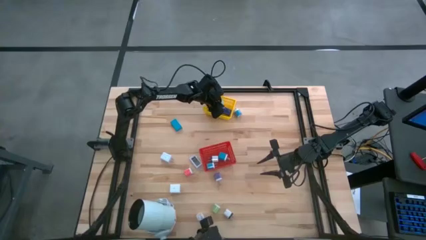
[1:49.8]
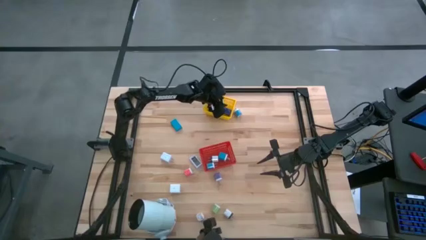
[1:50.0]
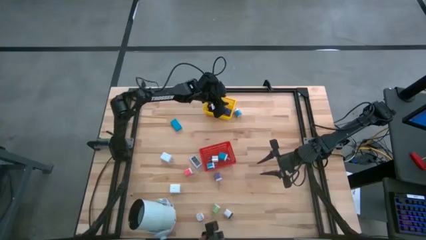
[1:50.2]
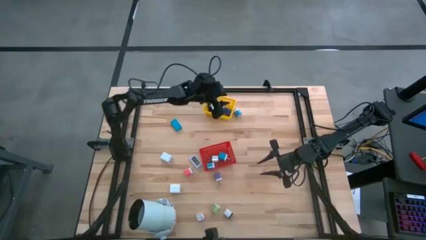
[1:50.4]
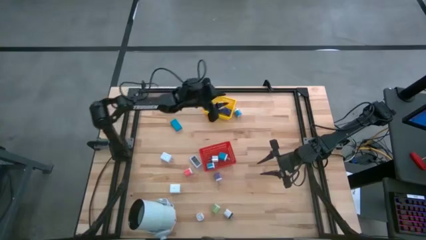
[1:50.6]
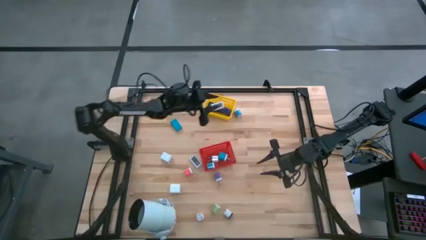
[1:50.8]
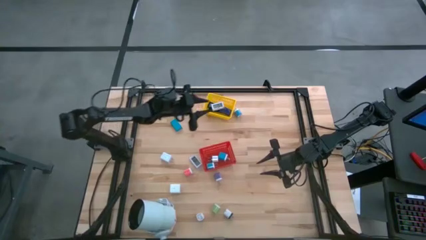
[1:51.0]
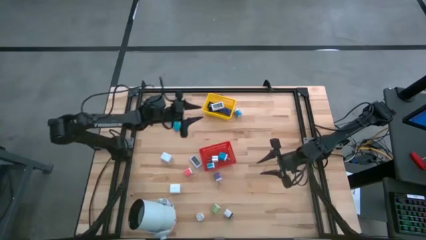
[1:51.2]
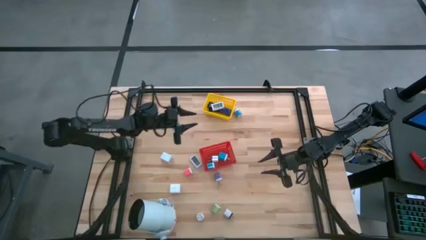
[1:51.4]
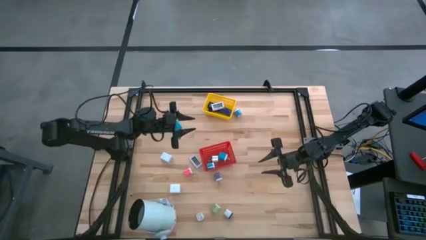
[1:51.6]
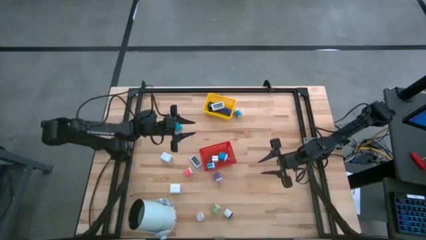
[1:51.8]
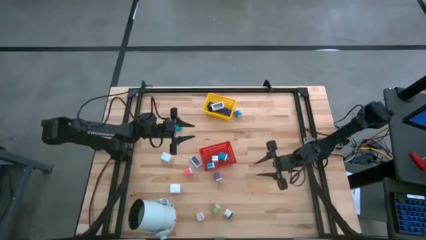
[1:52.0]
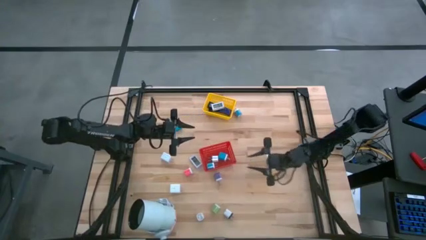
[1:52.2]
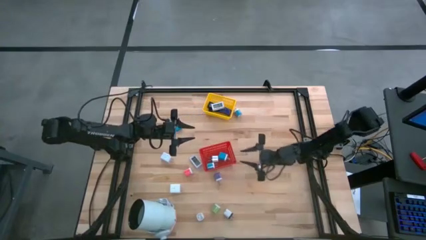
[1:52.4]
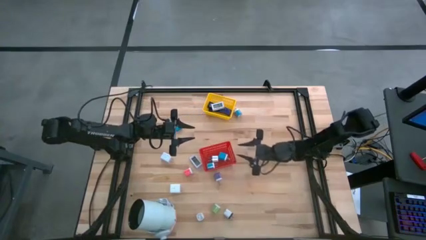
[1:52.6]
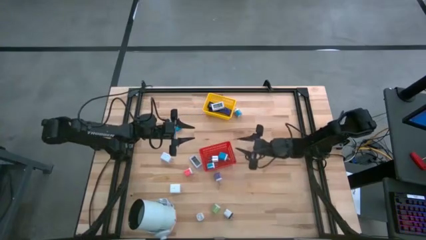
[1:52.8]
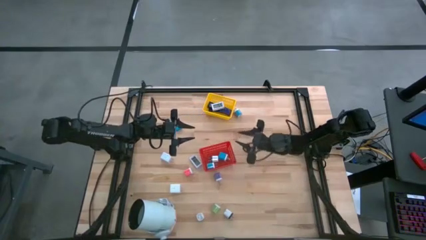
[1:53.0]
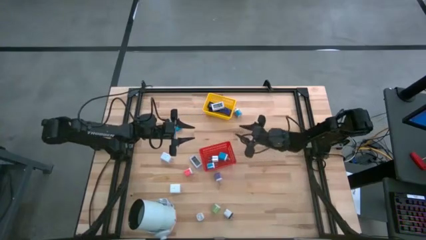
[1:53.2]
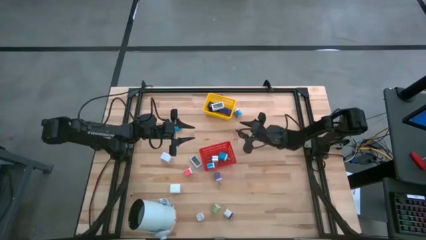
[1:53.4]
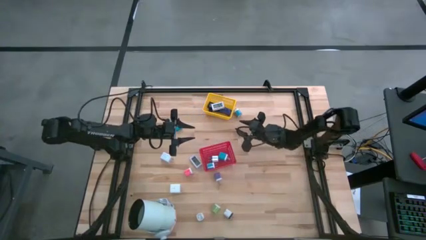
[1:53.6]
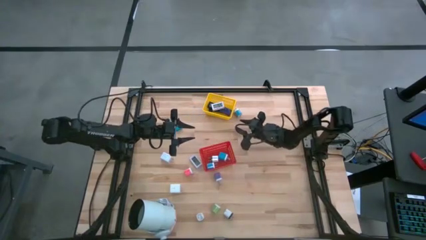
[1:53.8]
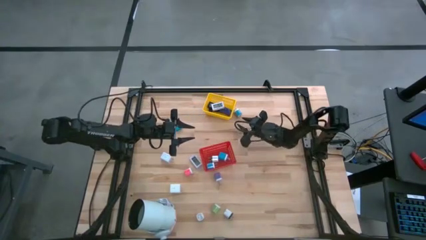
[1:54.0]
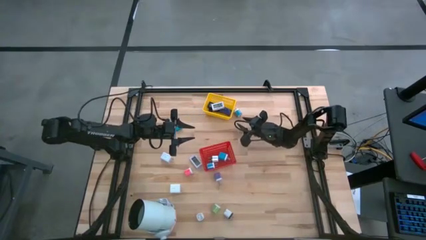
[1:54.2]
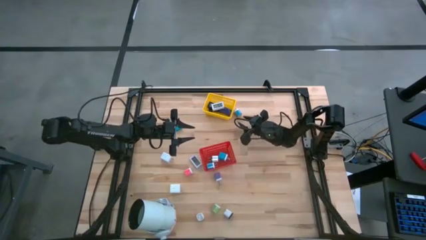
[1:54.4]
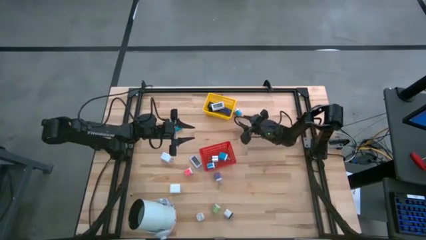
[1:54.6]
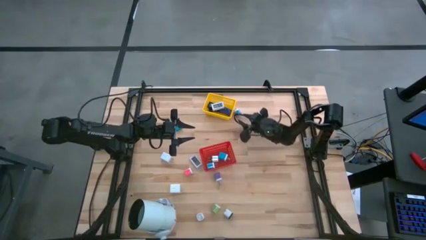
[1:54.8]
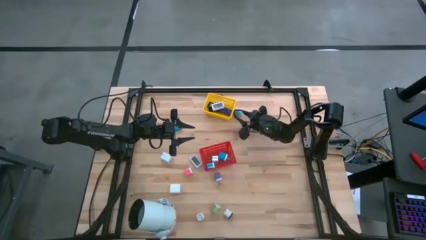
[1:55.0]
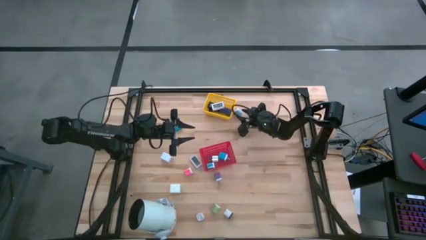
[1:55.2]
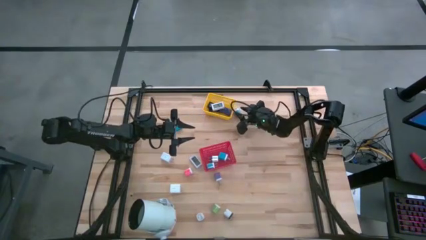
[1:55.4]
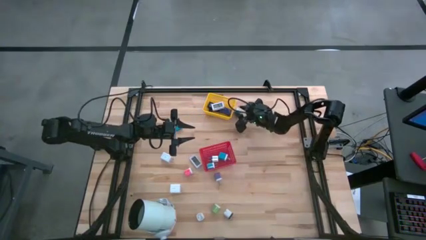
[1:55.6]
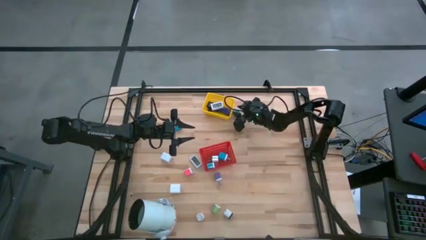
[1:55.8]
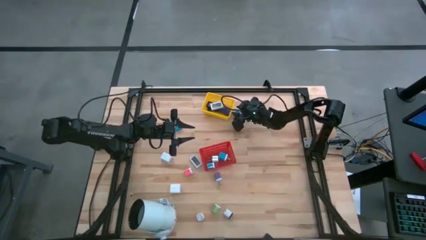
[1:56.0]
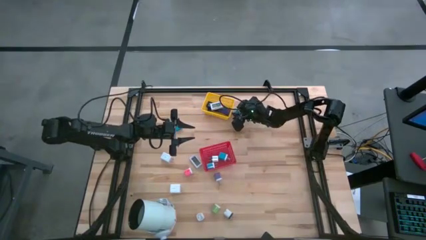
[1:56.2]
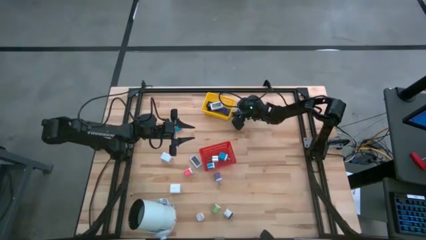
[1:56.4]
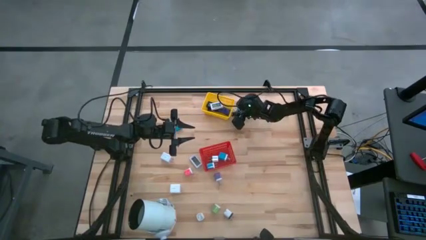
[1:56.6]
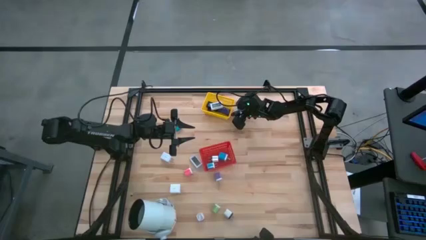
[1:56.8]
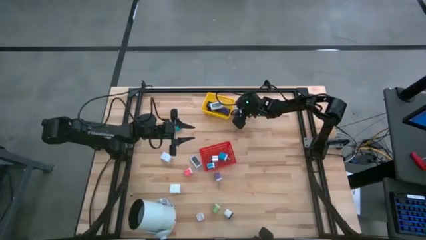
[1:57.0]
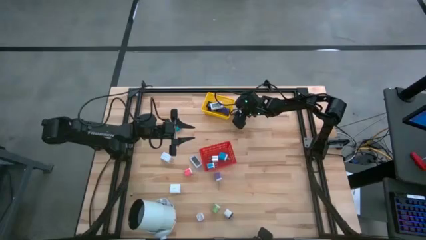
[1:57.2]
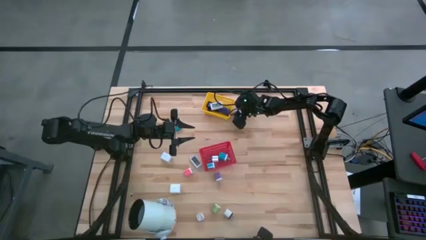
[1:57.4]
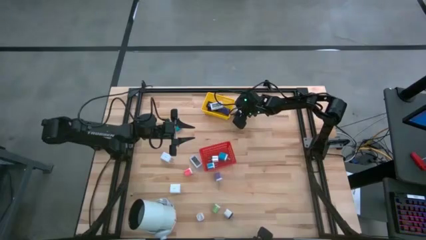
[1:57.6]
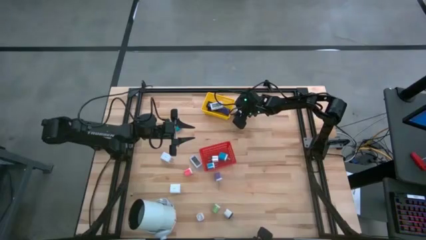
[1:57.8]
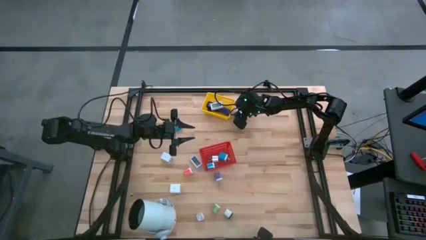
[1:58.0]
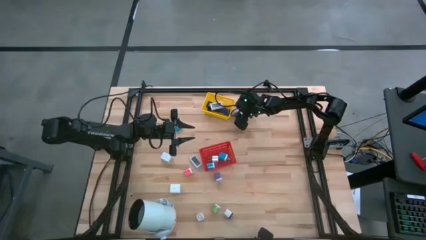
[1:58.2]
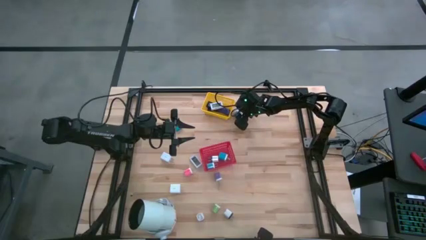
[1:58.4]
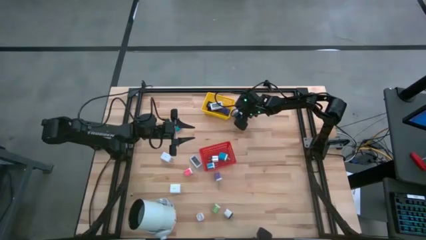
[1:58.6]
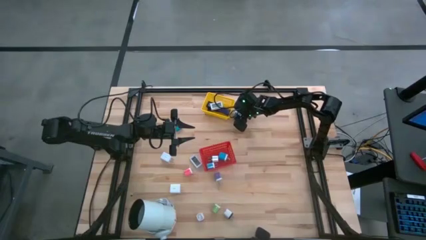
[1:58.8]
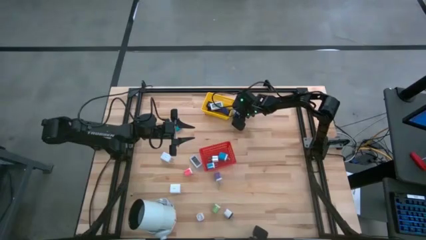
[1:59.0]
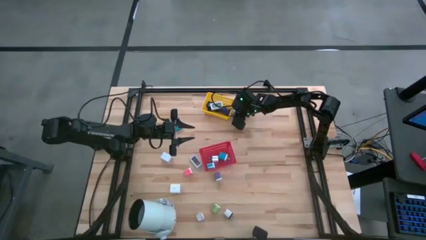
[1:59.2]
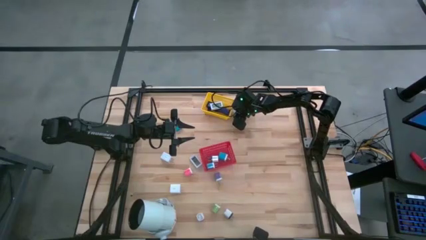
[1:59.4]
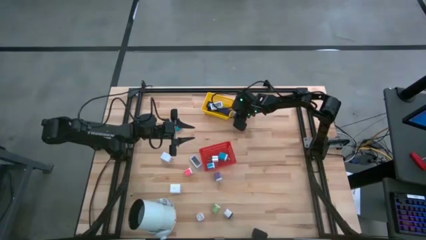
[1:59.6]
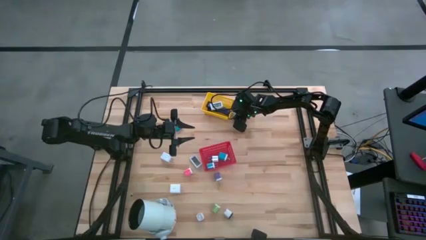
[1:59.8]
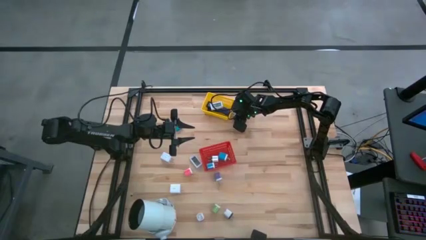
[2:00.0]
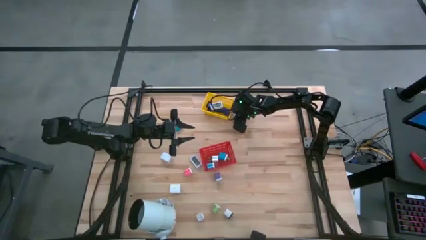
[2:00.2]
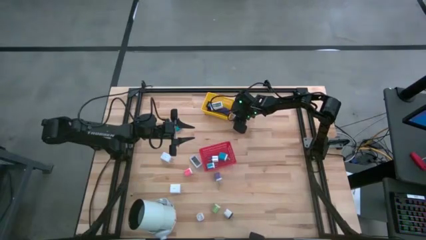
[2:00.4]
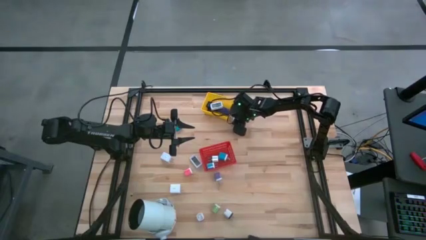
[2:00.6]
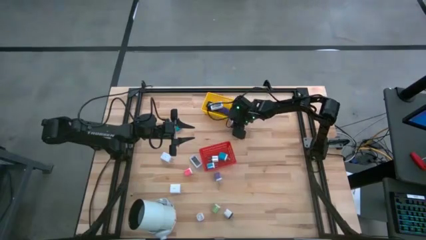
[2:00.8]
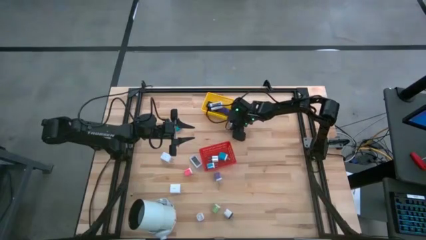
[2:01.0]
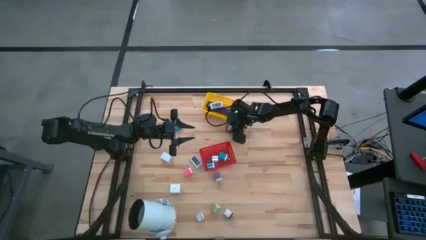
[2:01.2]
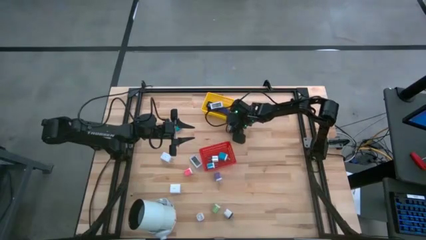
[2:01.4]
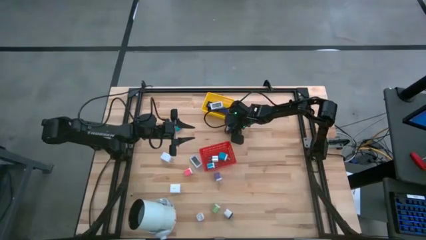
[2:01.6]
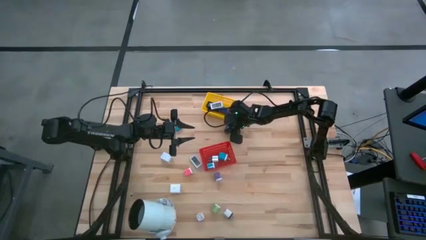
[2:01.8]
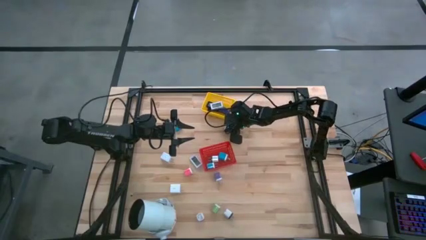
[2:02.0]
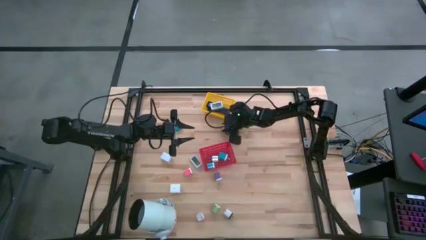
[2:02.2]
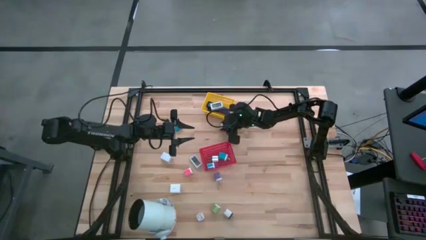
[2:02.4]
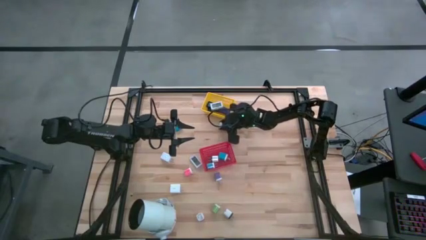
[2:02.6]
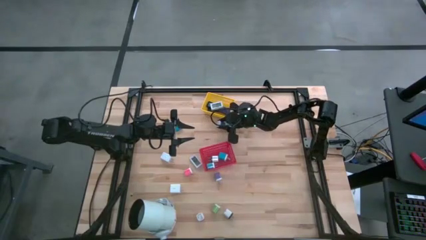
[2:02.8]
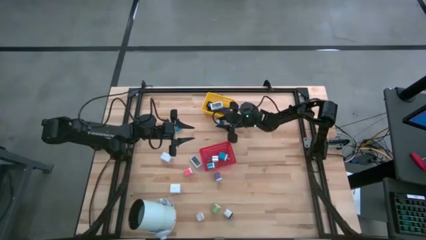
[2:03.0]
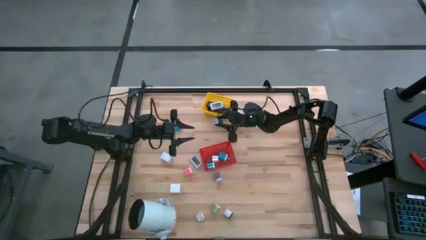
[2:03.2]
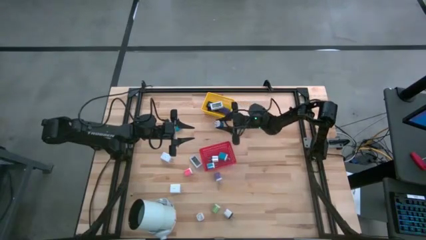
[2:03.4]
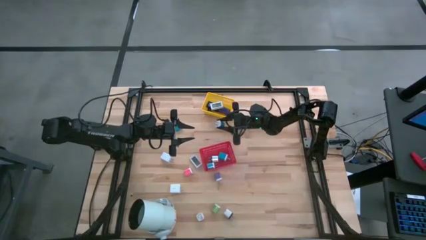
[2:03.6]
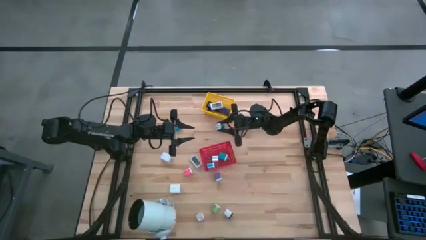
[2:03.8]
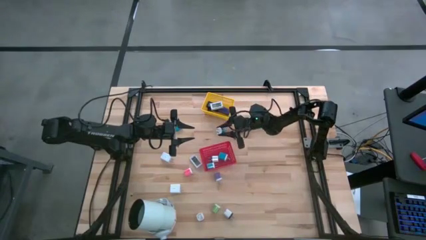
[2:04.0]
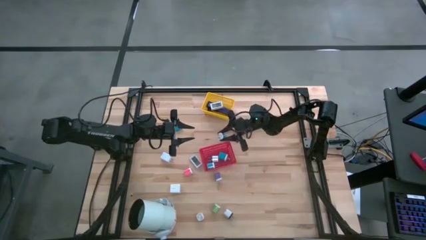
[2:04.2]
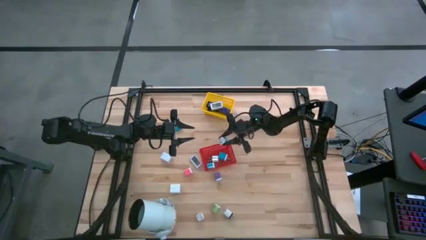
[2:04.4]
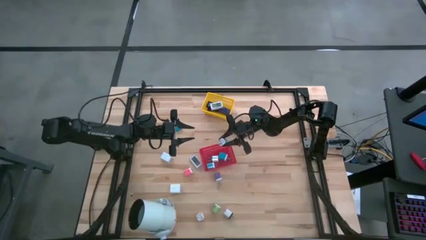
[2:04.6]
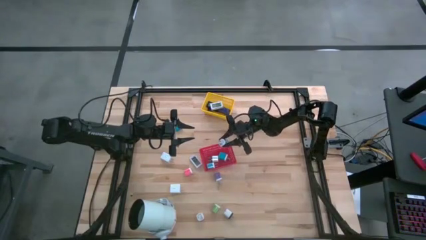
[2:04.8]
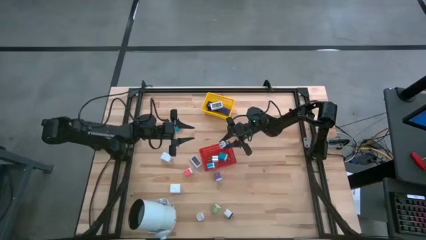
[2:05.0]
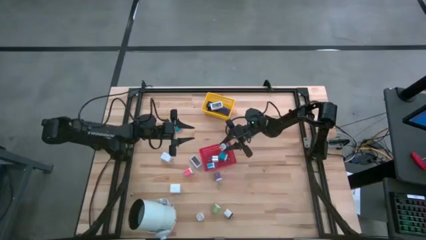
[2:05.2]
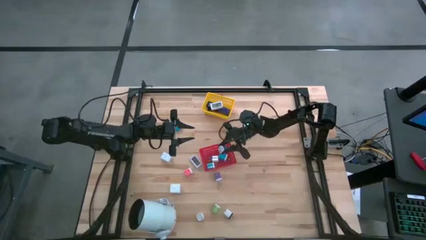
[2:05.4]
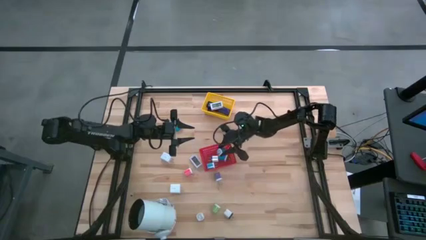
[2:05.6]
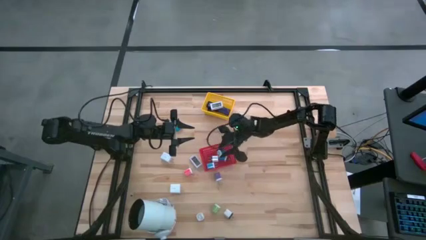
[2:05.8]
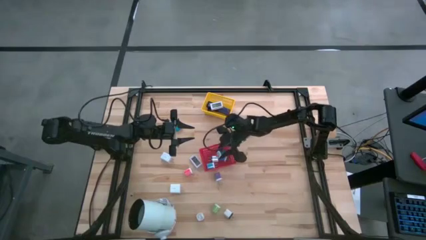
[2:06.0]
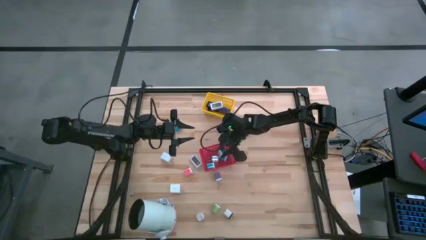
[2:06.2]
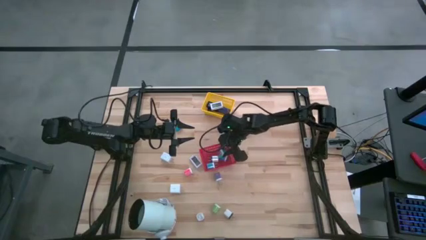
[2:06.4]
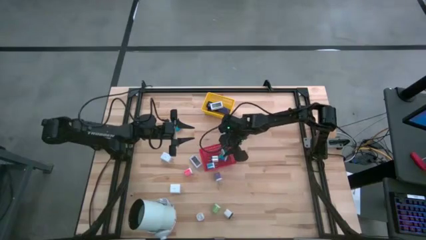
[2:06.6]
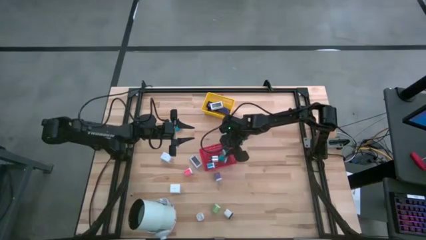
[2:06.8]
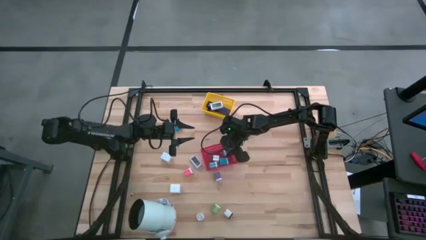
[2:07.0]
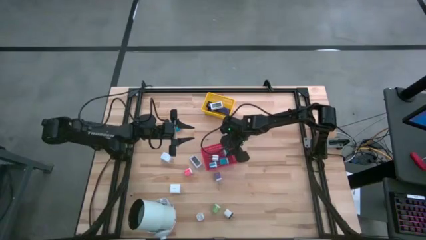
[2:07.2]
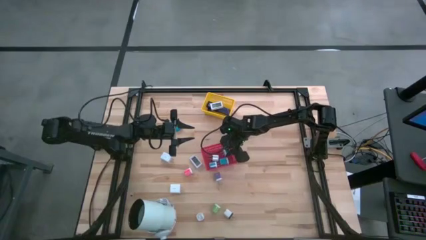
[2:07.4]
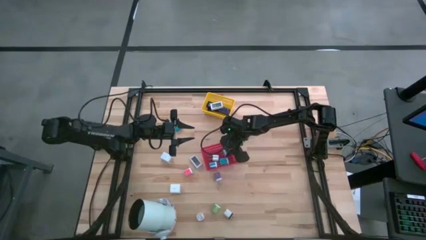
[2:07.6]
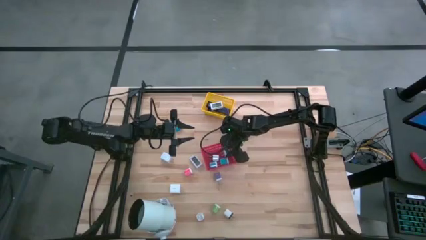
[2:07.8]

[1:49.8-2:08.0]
Task: Pick & Place Office items
Put the blue and white charger adapter into the red bin
